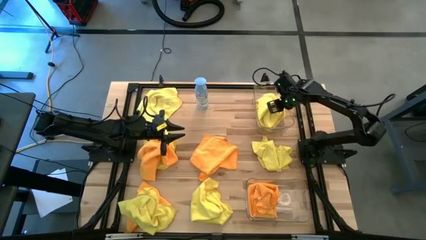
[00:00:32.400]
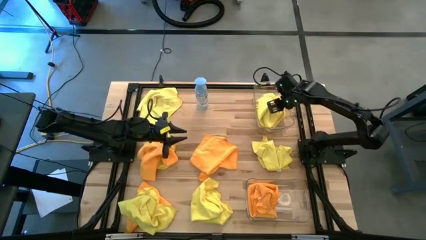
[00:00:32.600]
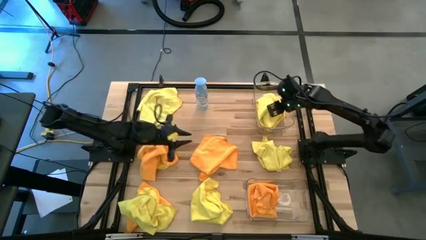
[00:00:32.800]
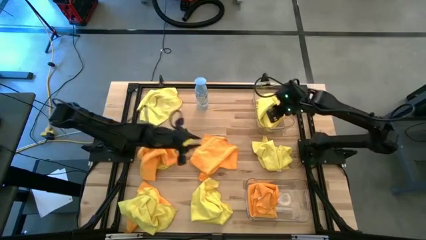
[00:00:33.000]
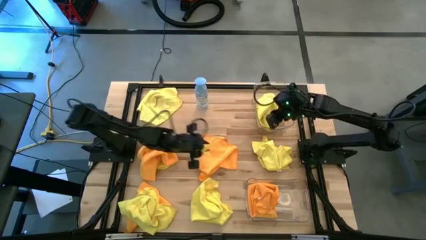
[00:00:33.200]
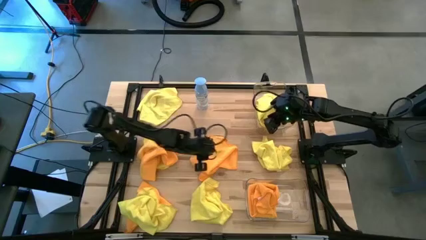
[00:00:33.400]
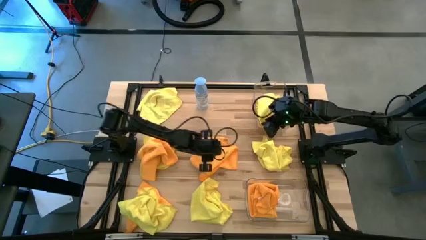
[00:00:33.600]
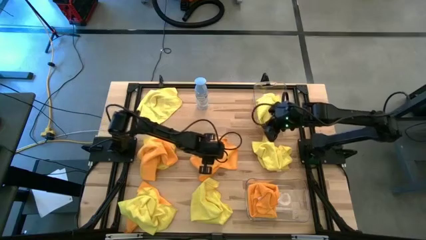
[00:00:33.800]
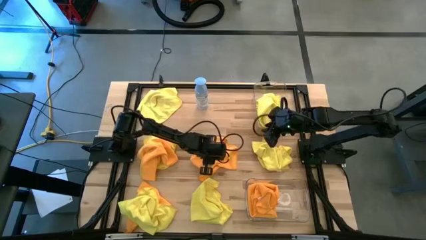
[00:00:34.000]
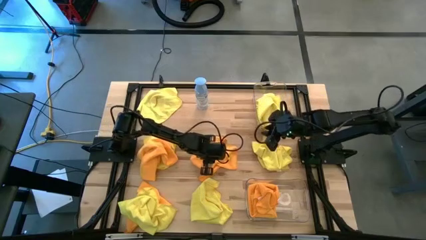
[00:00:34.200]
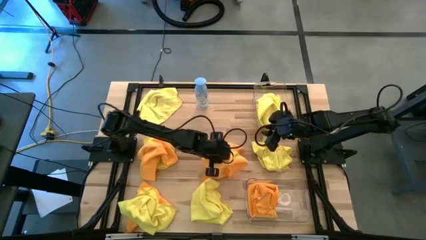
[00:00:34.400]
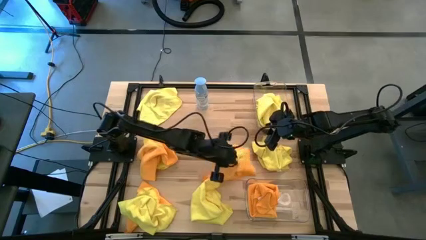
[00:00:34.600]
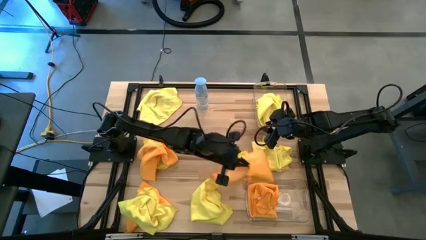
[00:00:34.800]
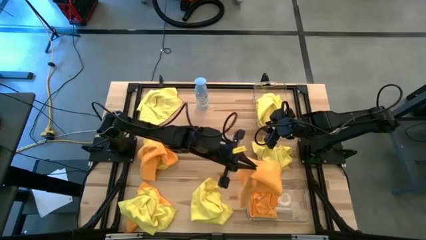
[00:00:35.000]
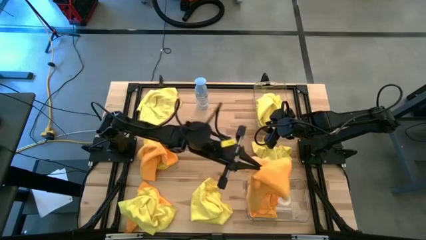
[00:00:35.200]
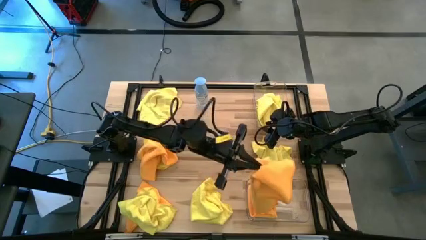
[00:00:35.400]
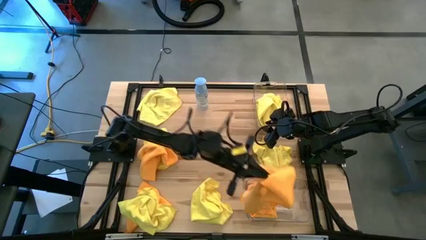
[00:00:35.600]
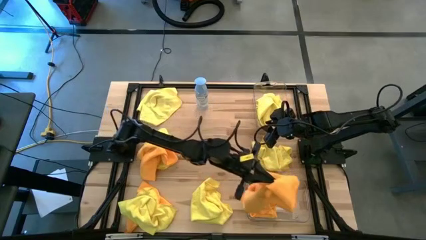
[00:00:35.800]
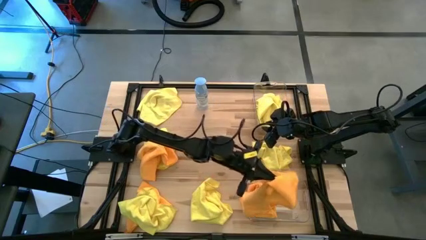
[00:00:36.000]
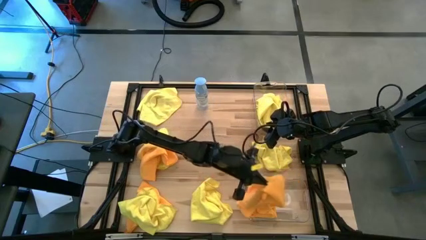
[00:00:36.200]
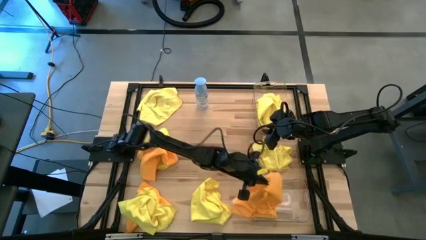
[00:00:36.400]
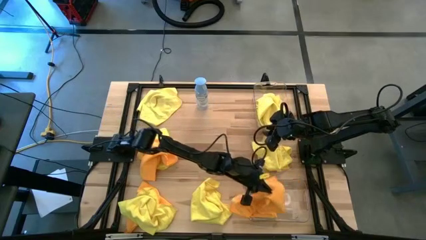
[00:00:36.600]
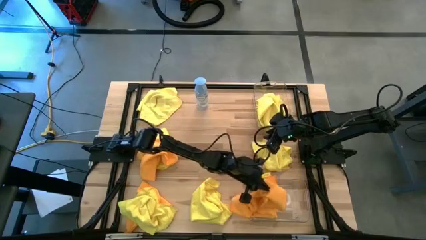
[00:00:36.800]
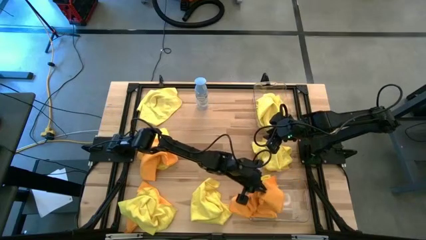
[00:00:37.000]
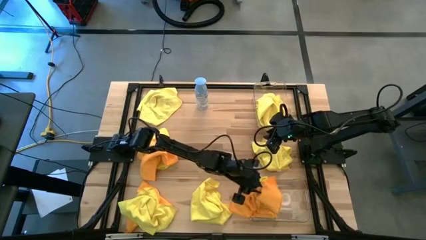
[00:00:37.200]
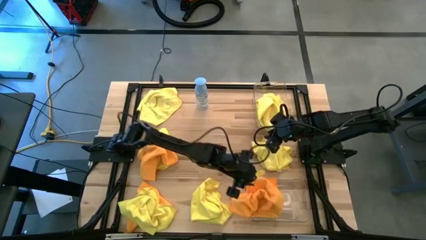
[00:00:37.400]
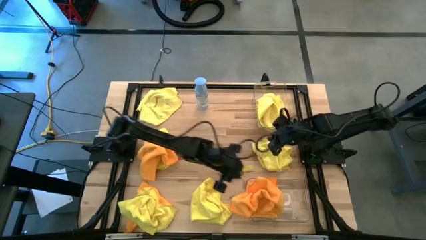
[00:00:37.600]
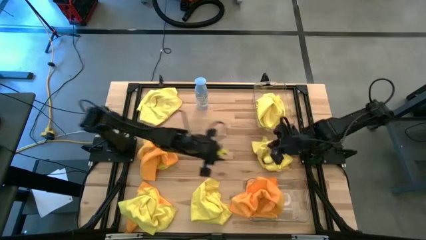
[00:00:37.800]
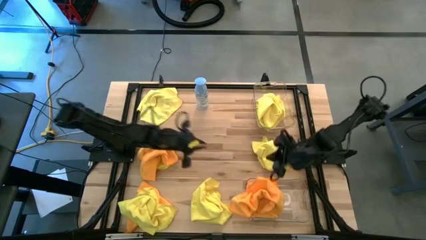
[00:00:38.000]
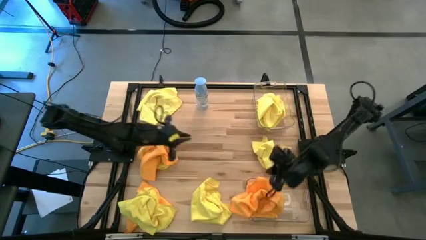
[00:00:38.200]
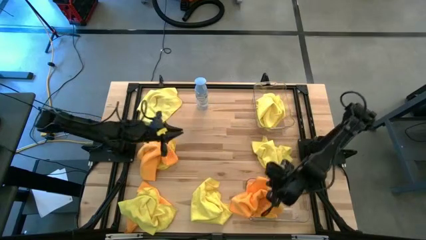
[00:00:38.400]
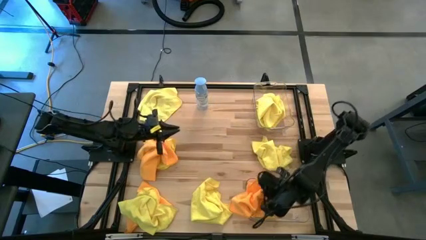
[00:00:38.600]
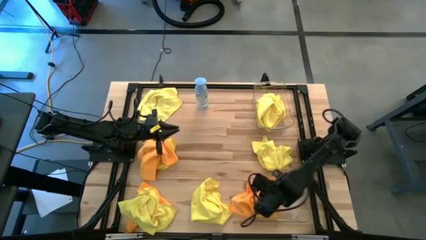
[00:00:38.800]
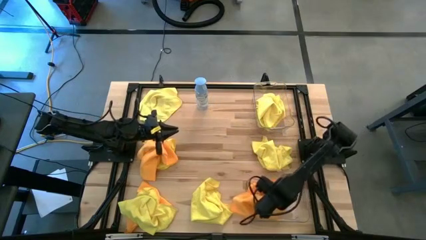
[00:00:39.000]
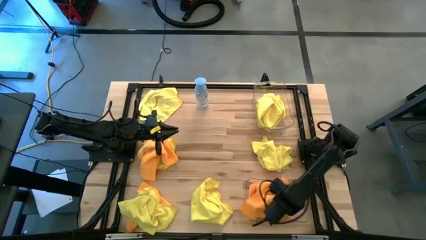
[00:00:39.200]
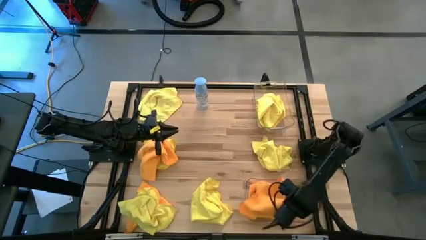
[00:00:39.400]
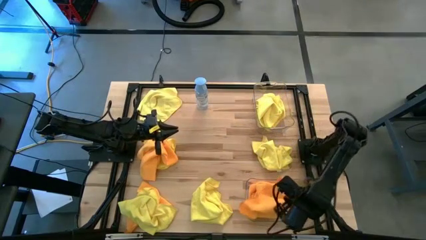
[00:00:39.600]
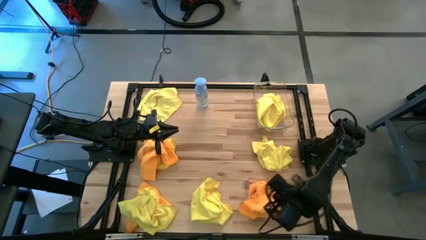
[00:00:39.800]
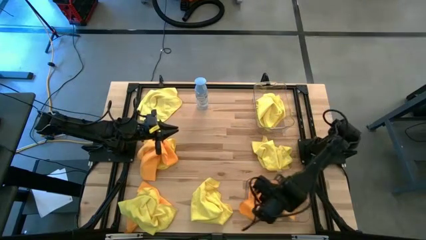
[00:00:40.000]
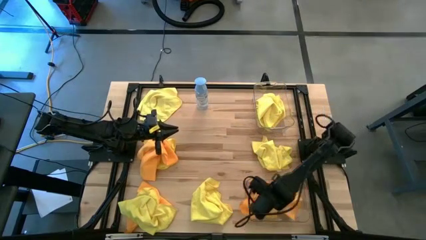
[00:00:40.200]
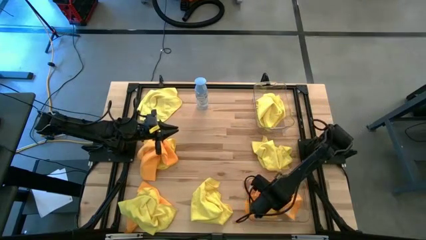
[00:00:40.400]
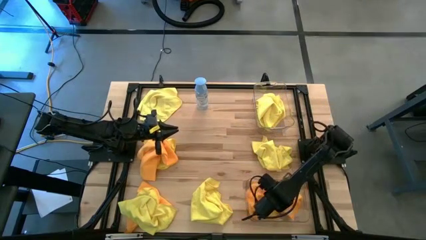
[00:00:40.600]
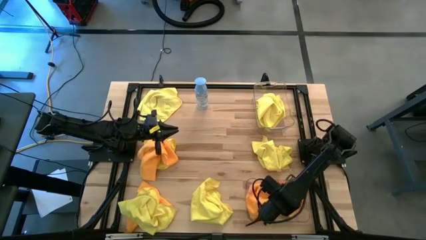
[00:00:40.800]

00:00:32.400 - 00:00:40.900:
Task: Sort microfiber towel by color & place in baskets
Put the orange microfiber cloth into the bottom transparent bin

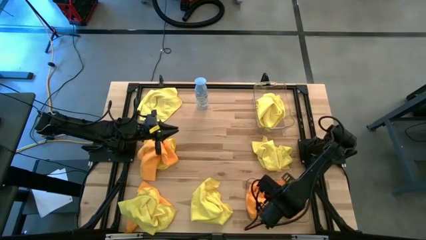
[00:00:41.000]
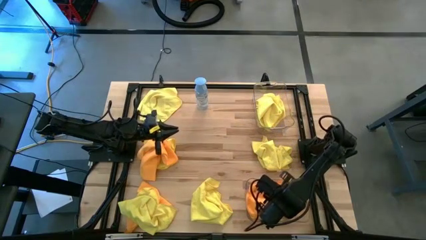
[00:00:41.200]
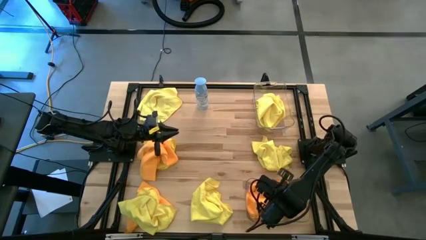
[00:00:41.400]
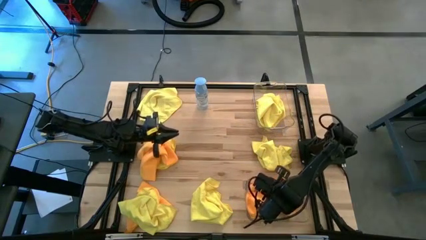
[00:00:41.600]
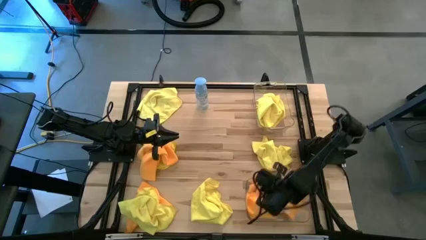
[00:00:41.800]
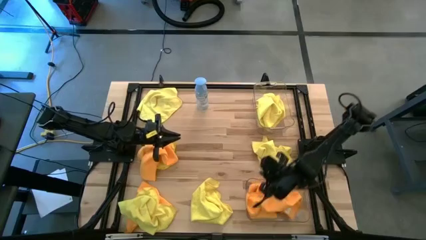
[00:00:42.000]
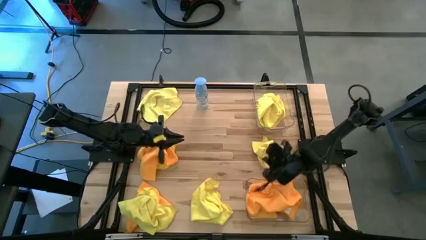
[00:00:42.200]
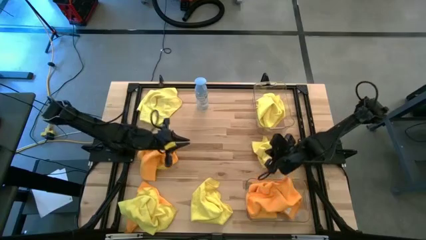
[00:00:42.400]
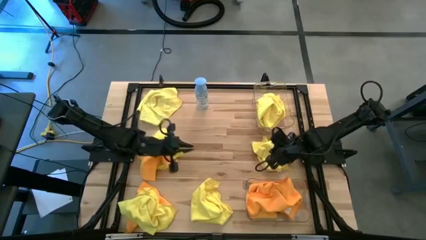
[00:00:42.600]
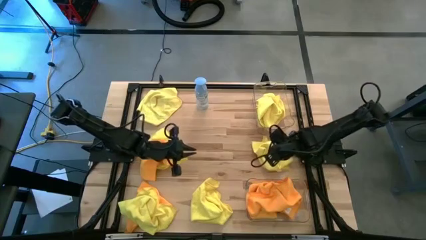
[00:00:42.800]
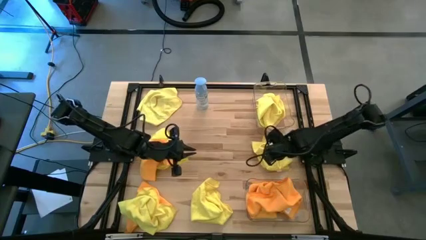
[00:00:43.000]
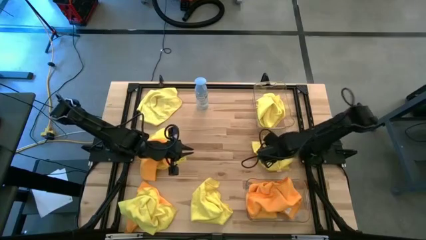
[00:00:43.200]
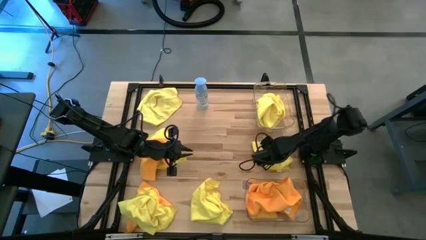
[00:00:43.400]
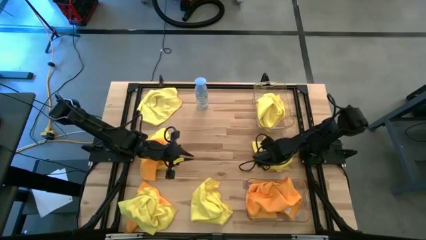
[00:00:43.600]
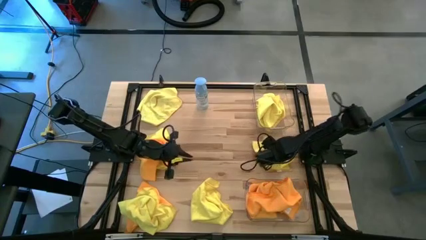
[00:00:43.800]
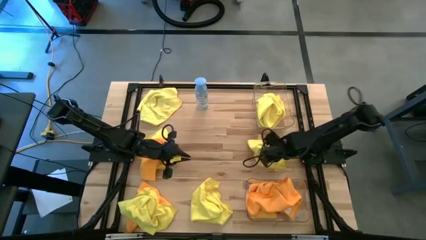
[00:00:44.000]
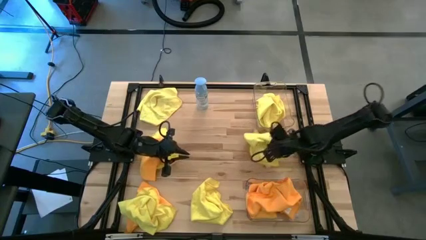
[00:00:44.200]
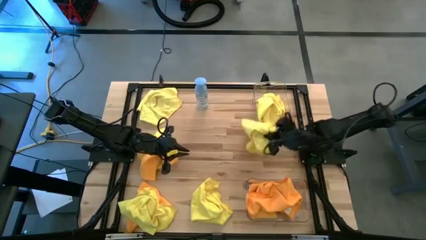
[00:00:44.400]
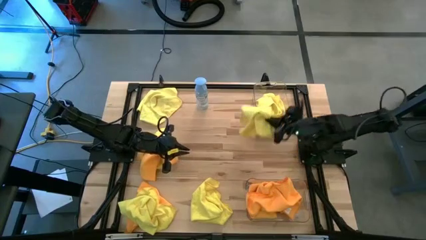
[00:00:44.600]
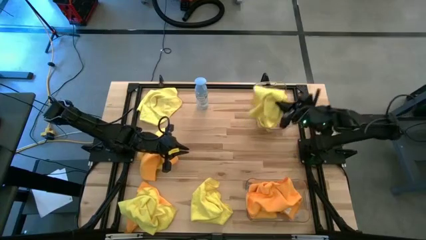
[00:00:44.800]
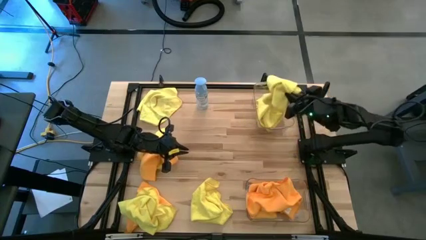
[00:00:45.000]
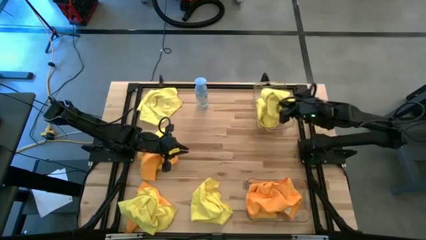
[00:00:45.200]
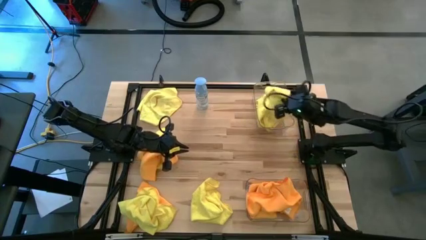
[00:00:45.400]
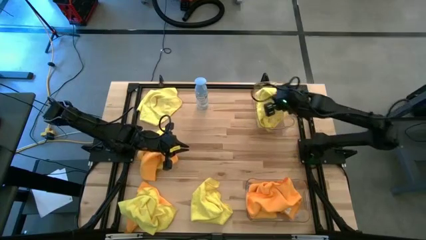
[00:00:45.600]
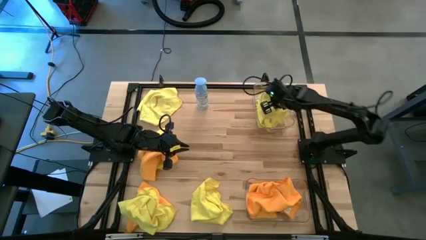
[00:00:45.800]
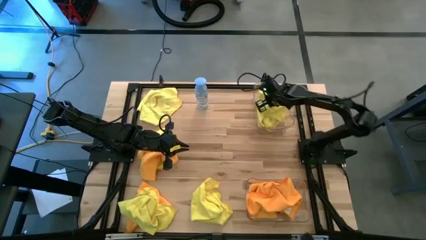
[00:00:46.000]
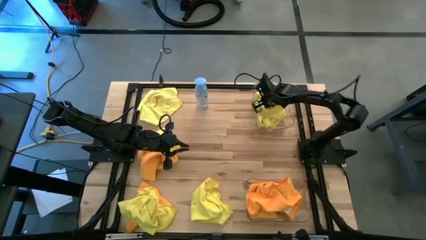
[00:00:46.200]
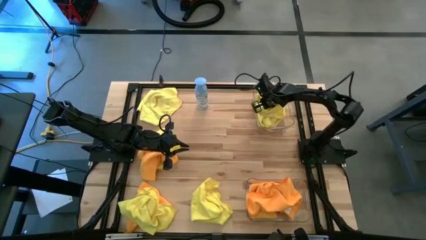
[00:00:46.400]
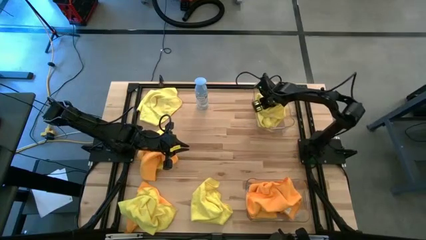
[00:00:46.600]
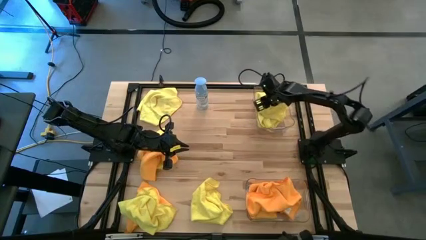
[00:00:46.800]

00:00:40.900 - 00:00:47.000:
Put the yellow microfiber cloth into the top transparent bin

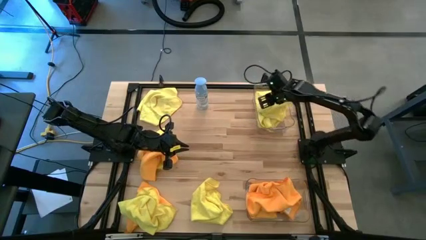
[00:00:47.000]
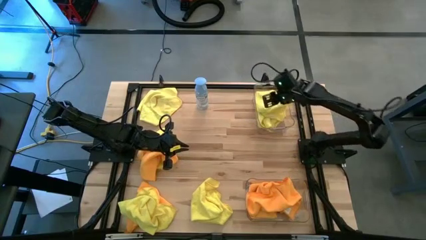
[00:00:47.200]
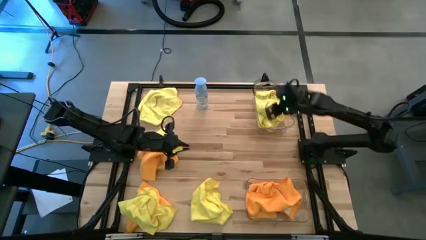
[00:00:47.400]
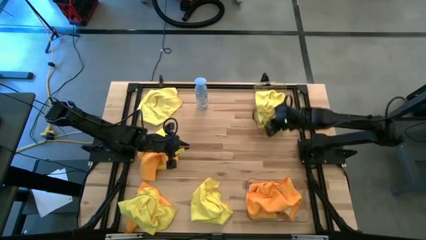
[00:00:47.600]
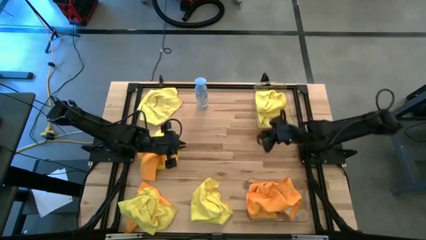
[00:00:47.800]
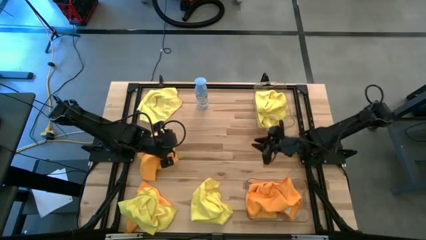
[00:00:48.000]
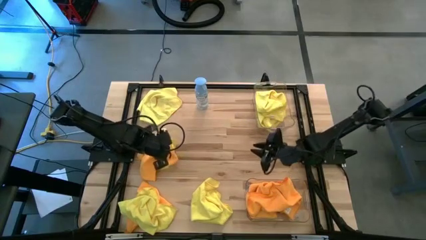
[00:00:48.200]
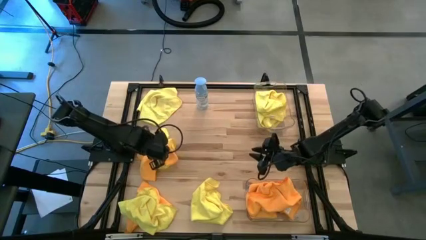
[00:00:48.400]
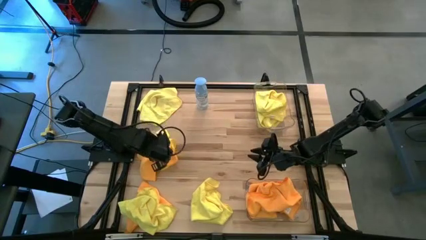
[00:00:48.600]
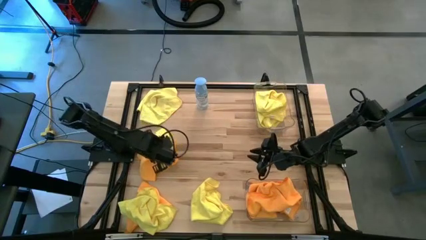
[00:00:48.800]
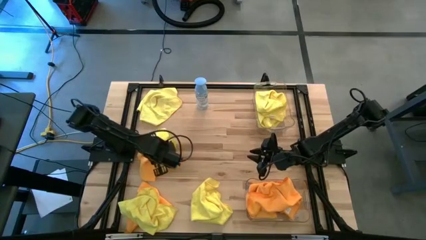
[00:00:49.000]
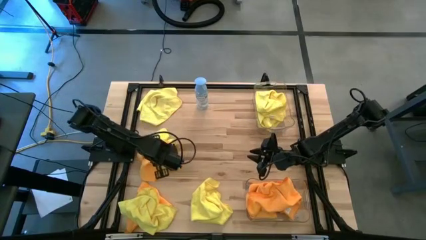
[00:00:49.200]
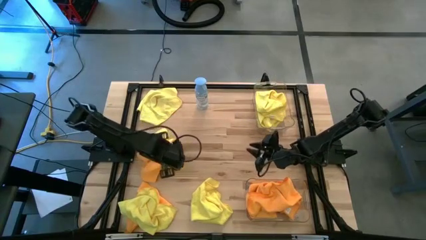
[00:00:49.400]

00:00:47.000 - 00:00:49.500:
Put the orange microfiber cloth into the bottom transparent bin
